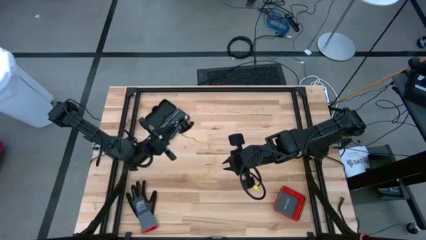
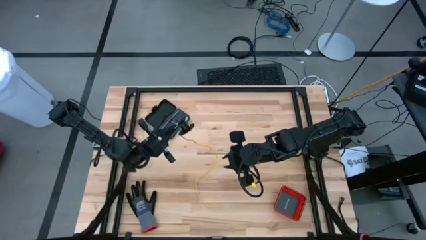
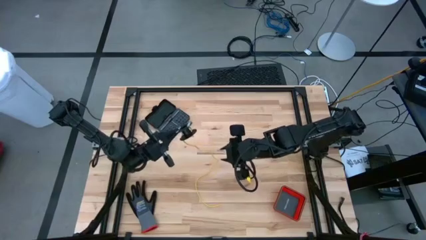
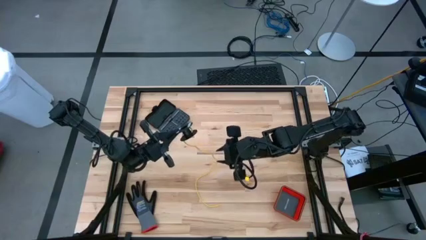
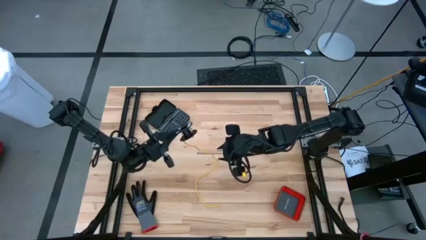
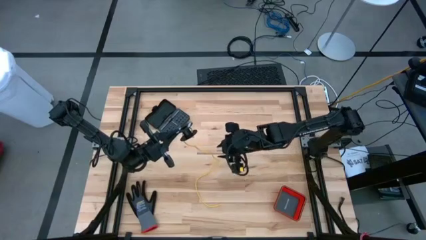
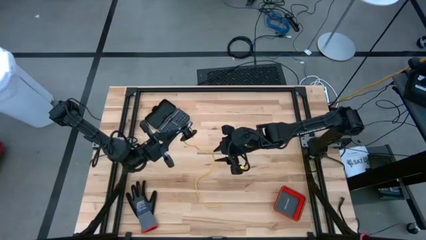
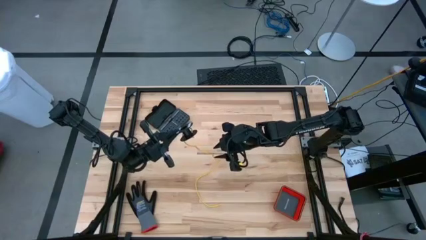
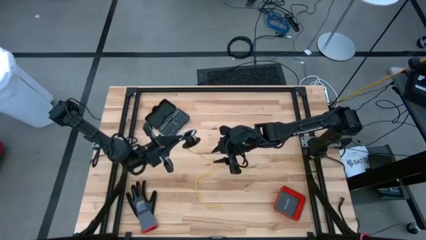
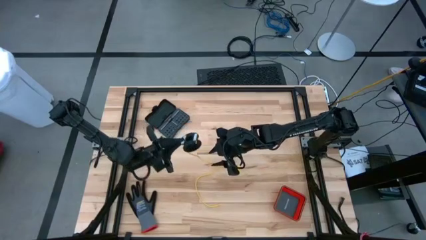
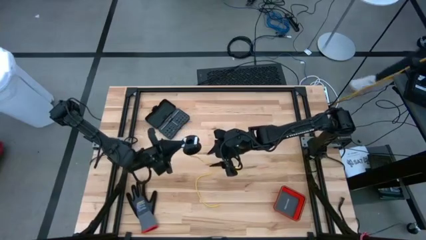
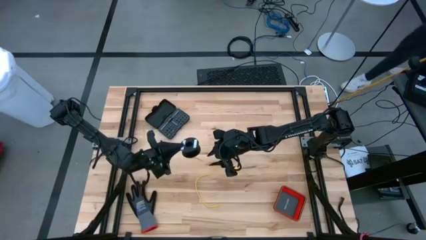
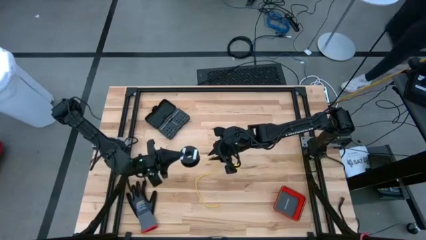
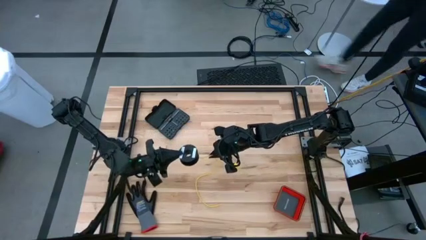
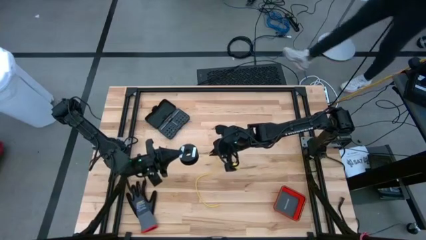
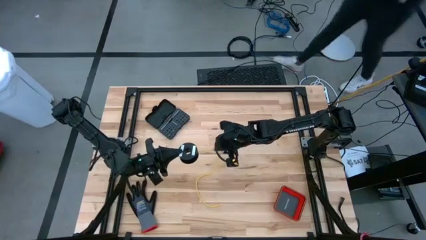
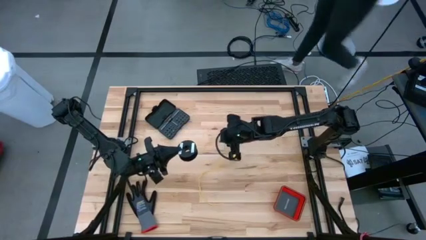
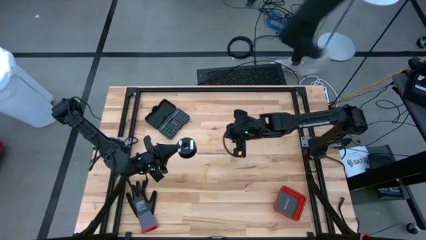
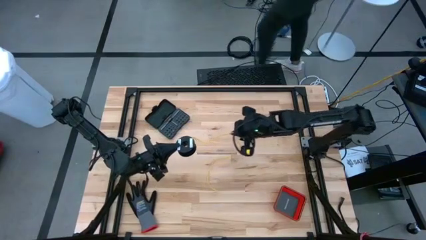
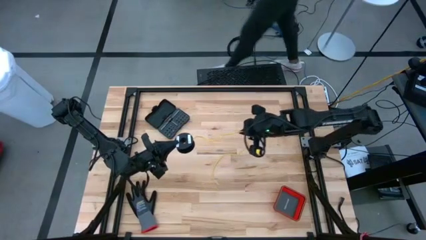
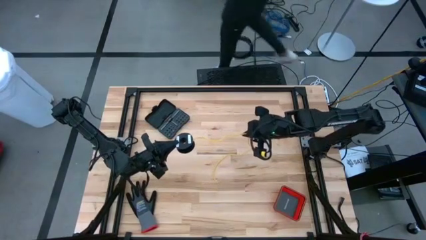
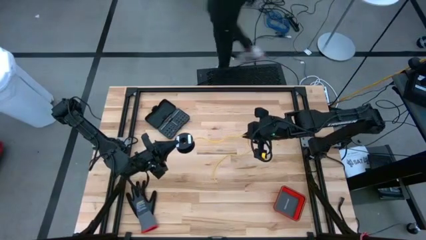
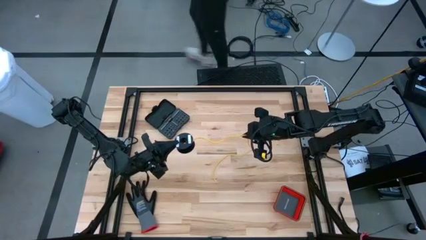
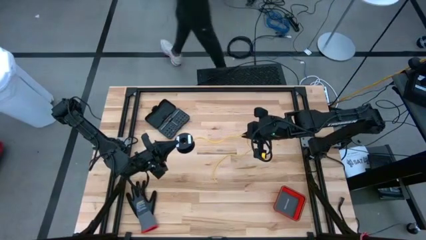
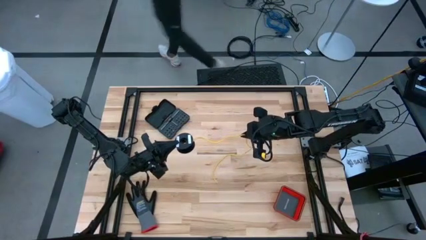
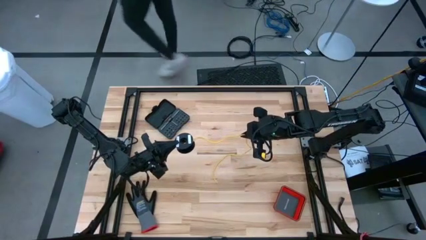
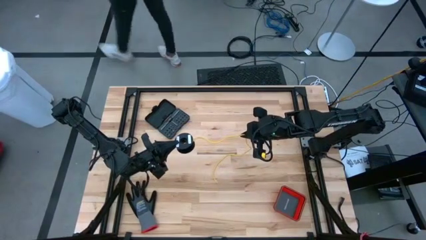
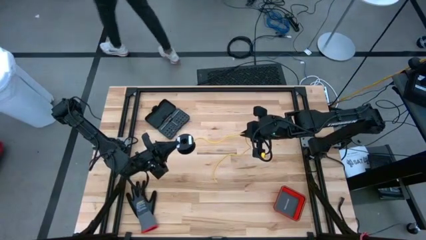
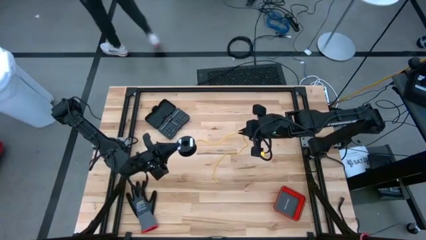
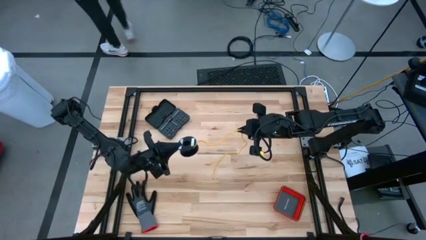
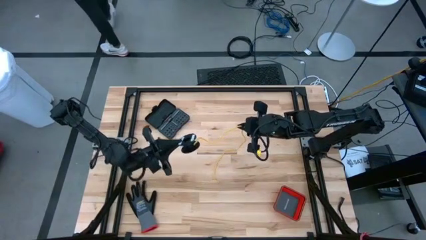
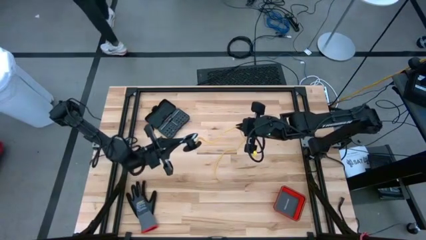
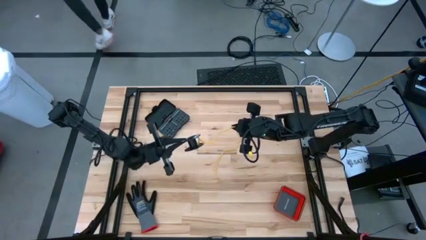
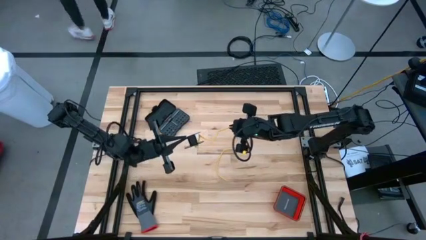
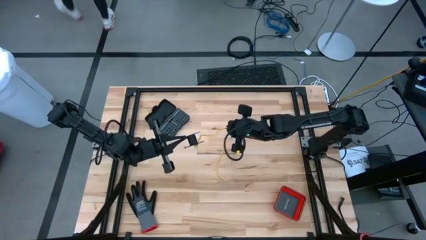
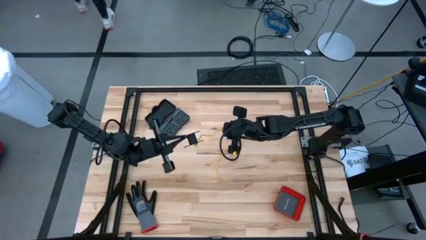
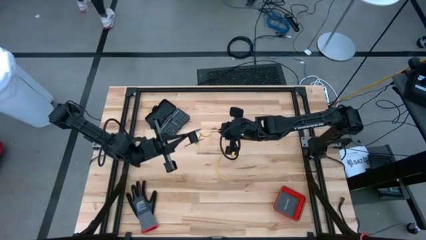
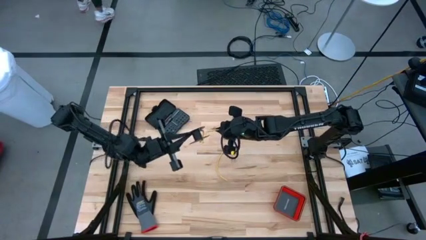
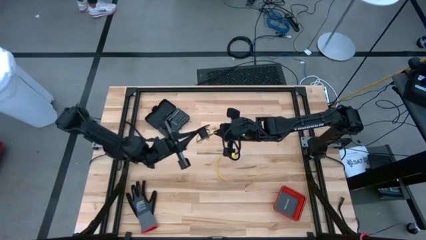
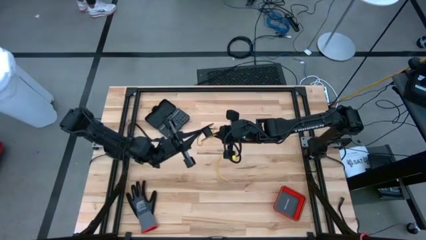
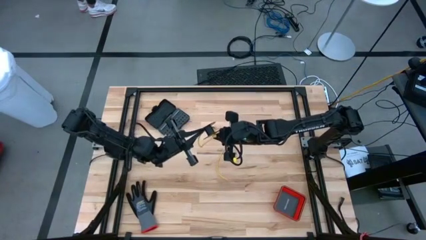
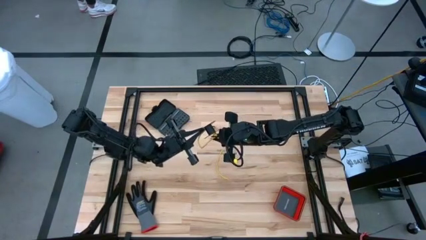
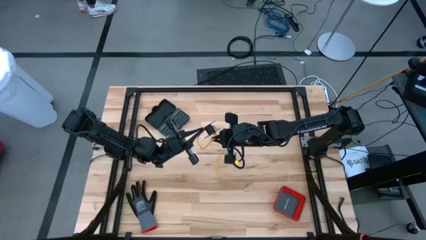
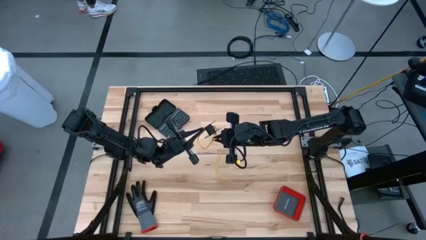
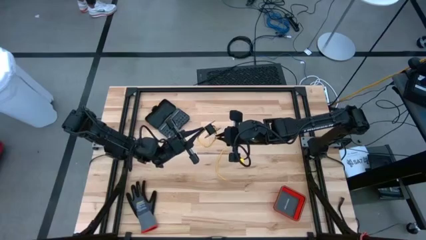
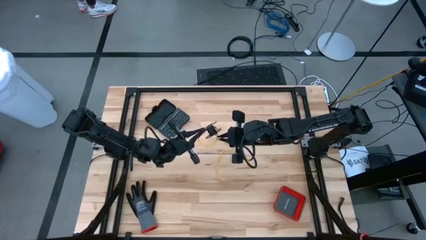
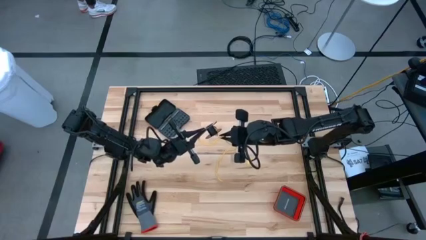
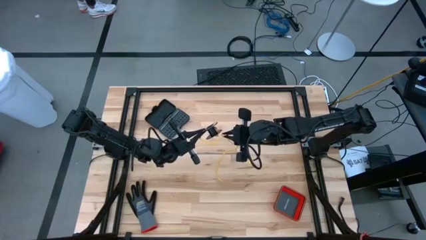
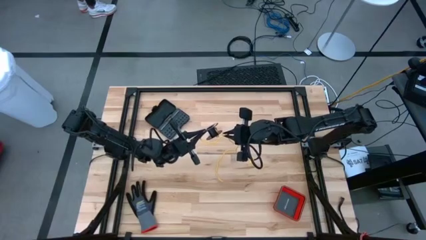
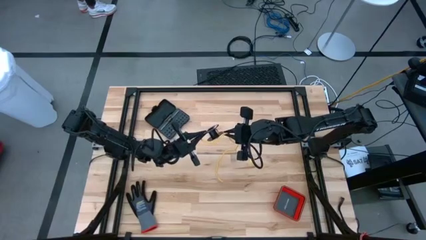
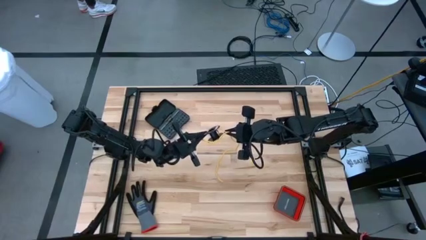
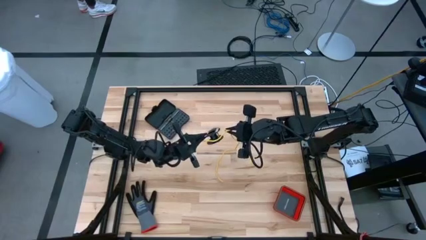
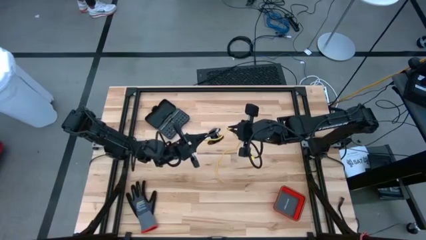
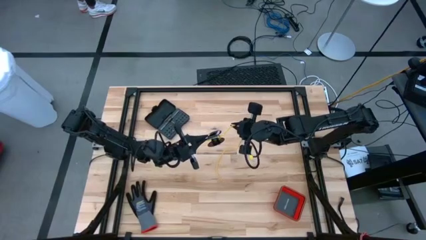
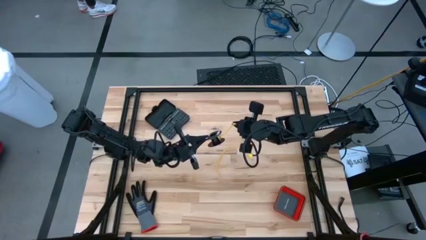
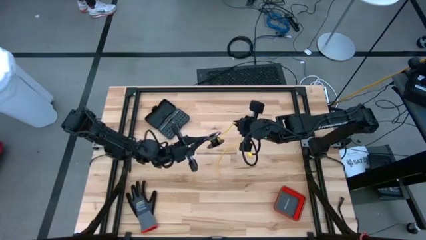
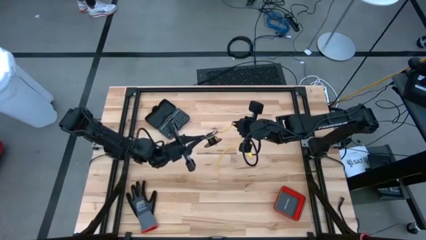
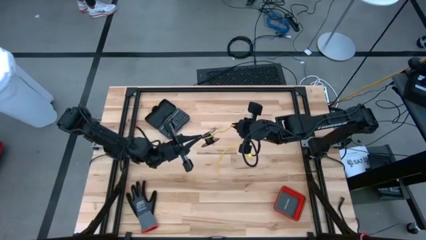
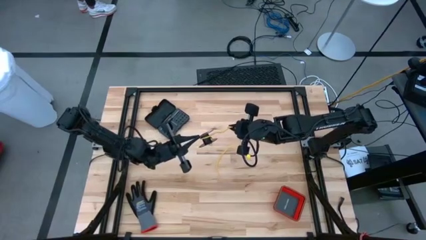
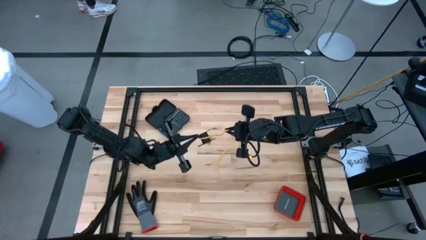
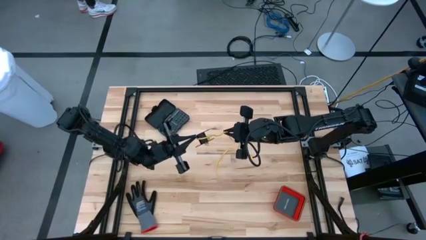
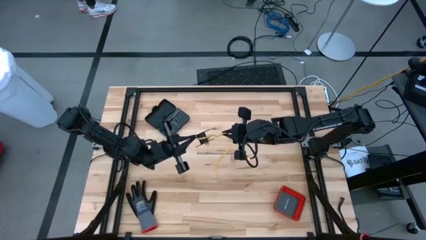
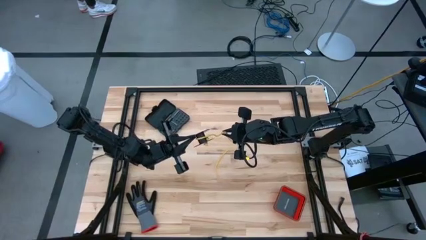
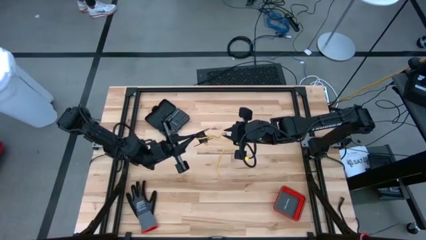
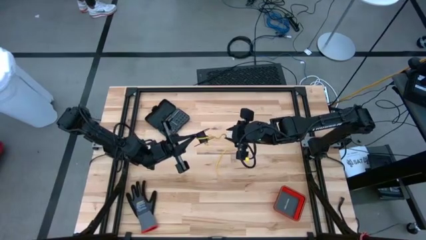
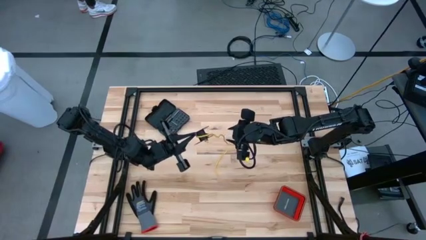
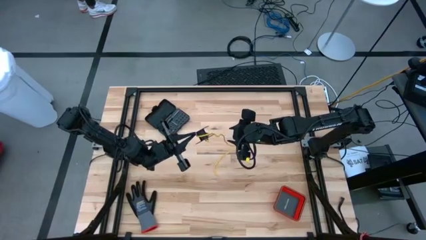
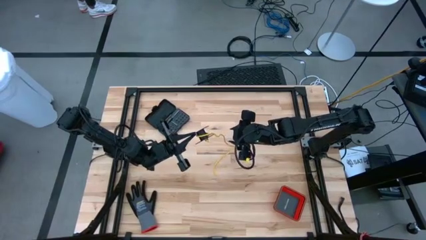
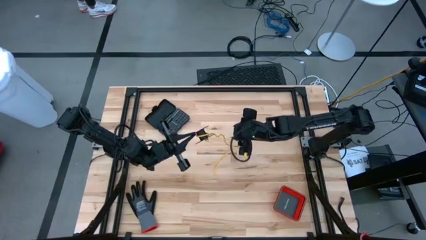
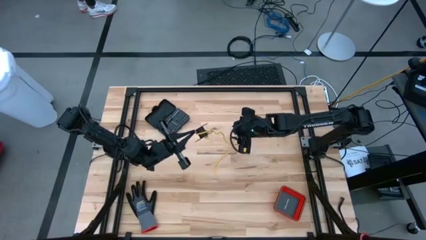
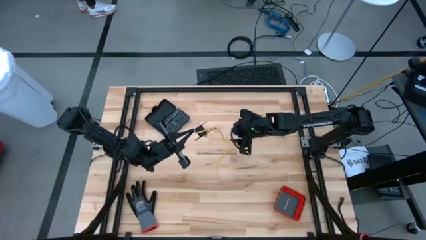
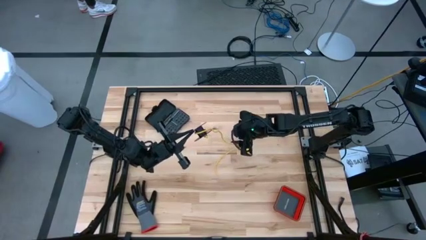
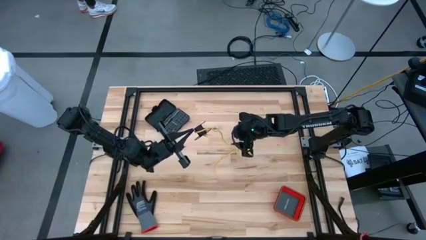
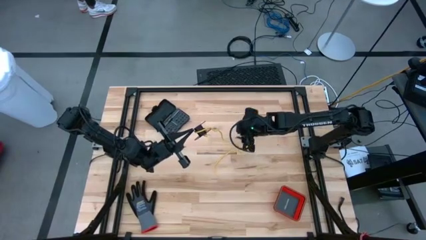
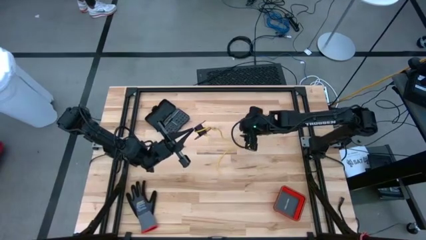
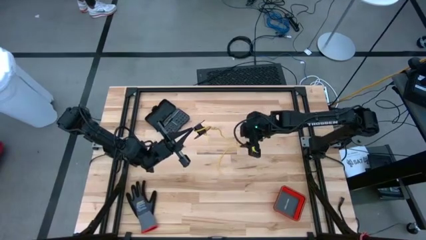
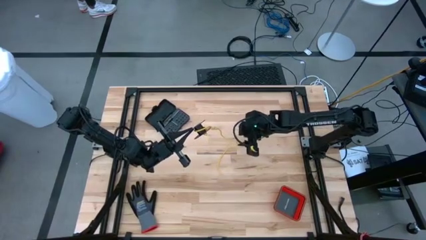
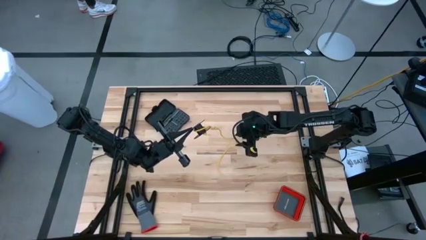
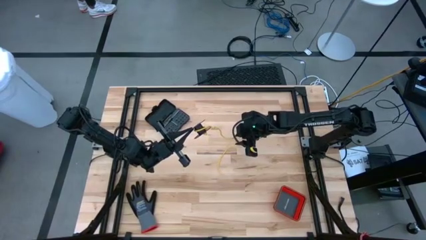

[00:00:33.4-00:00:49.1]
Task: Coil cords
Coil the yellow wire onto the spool
